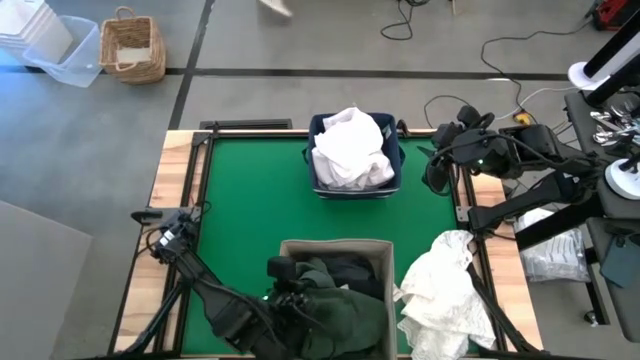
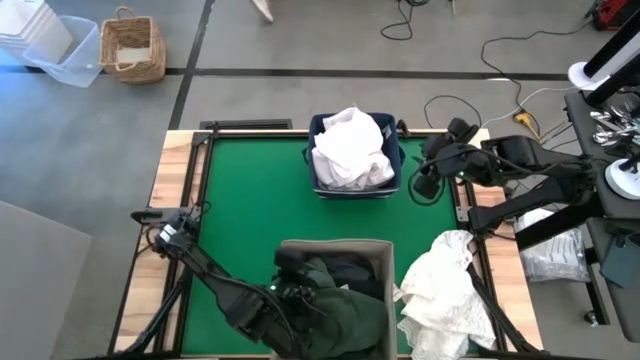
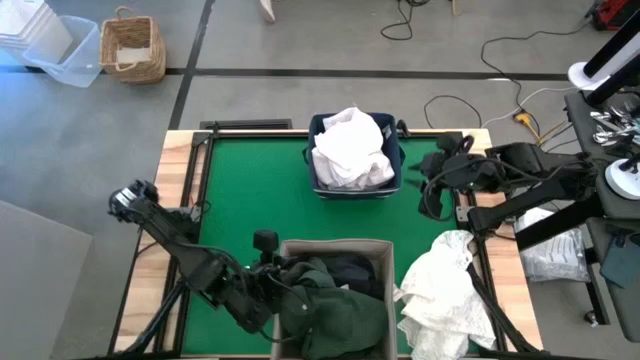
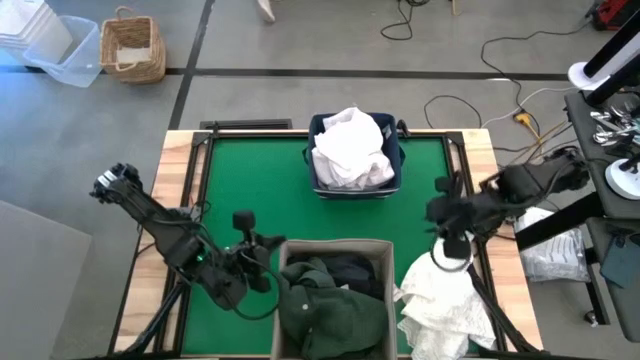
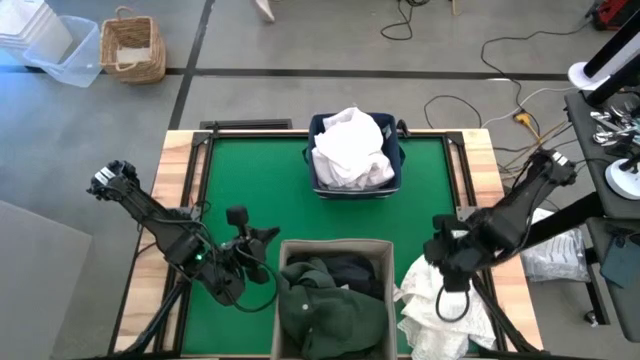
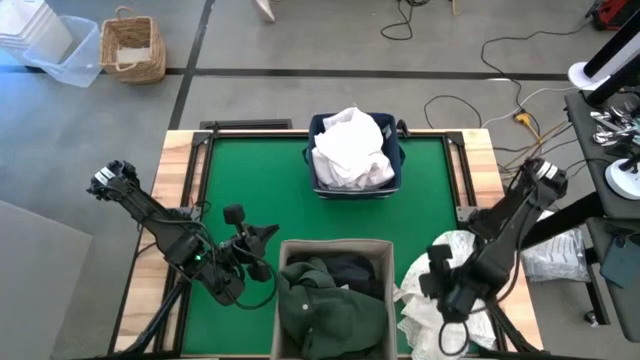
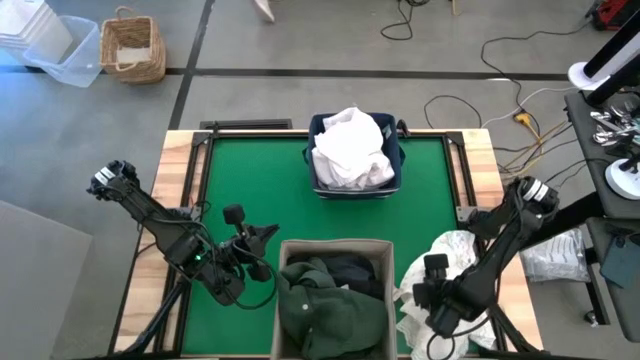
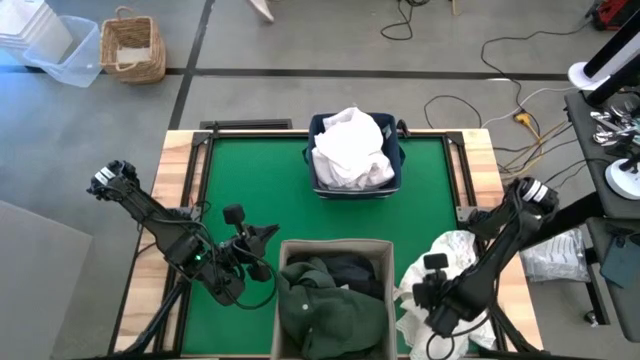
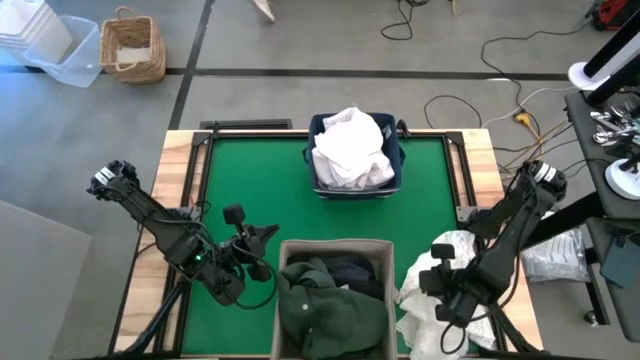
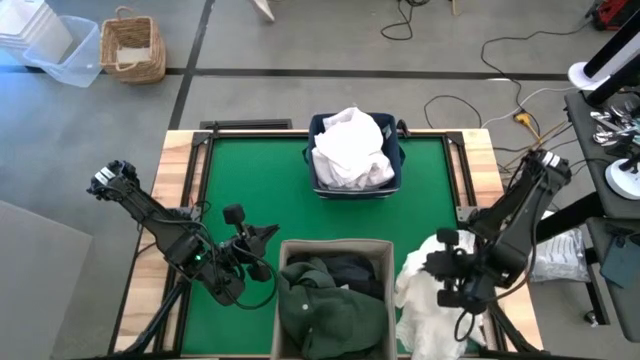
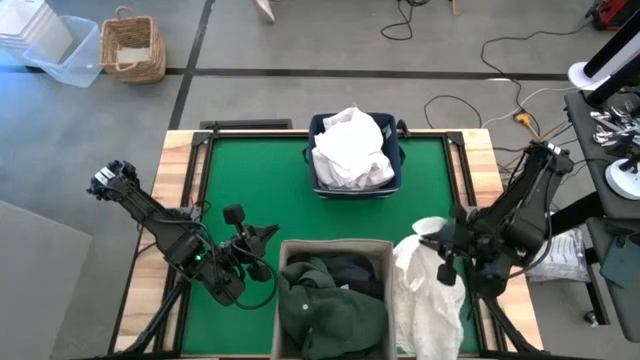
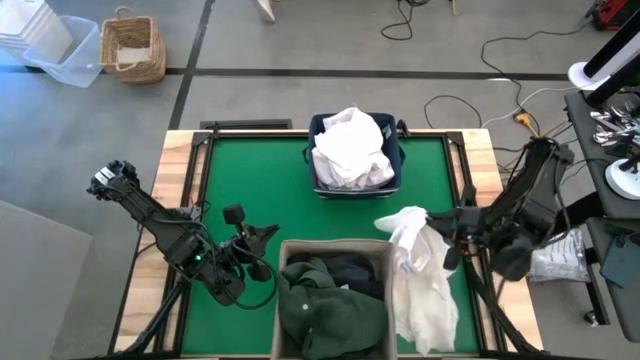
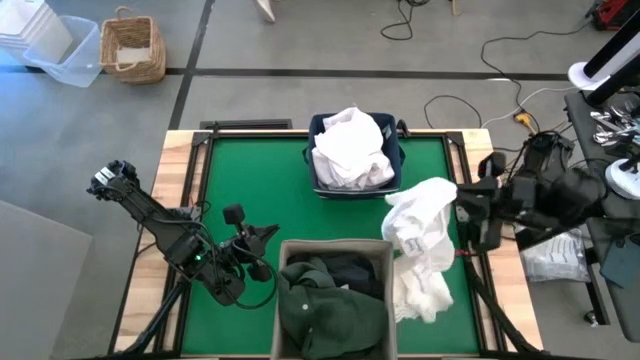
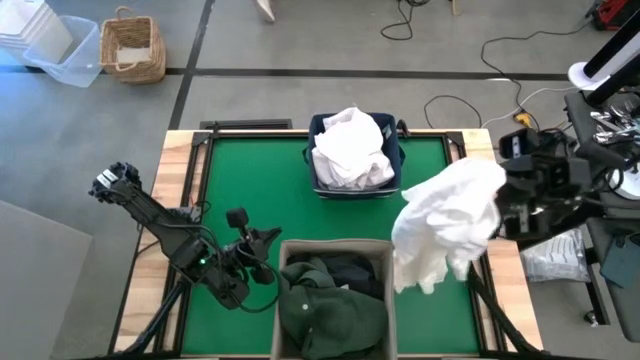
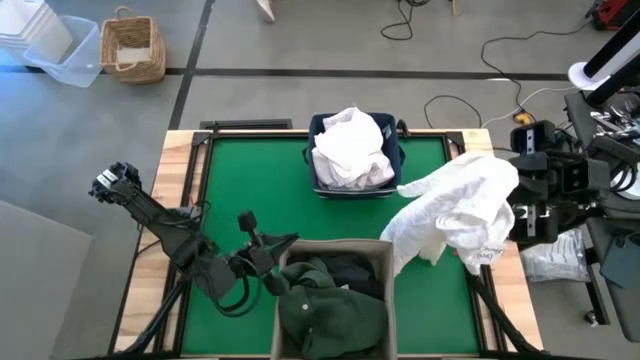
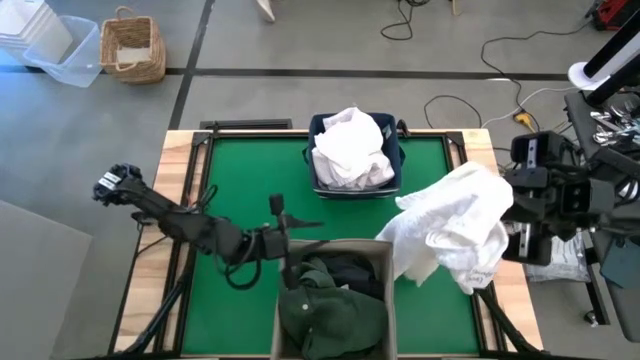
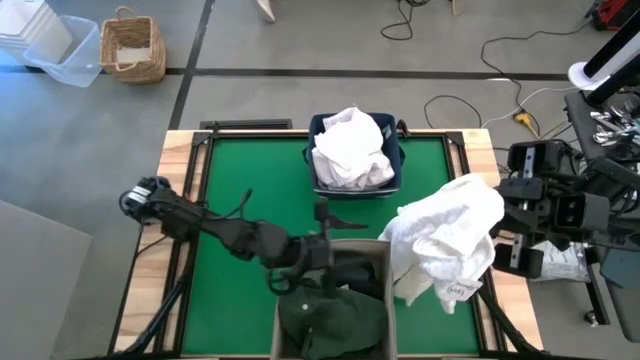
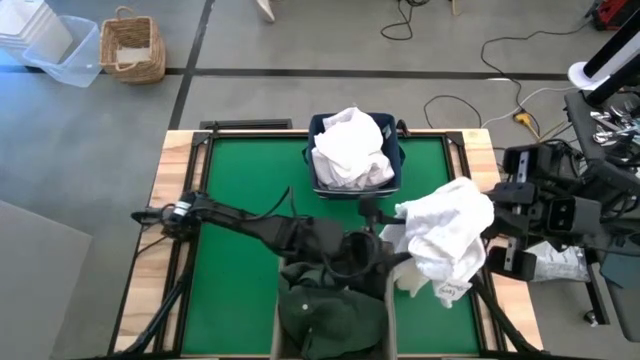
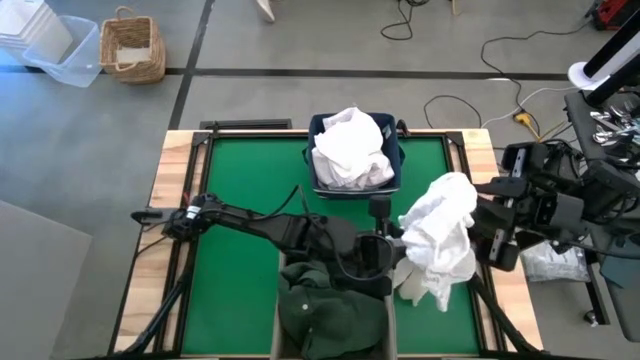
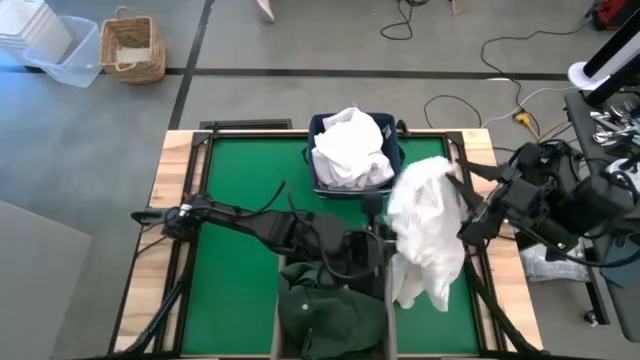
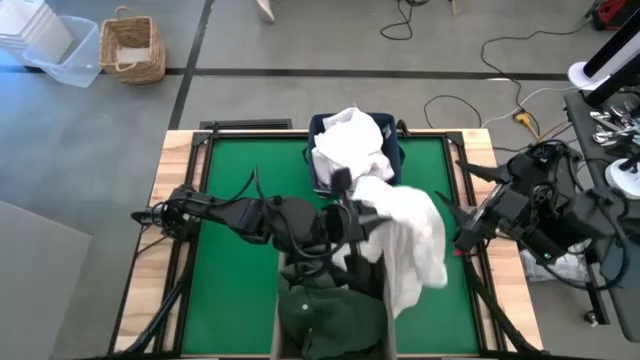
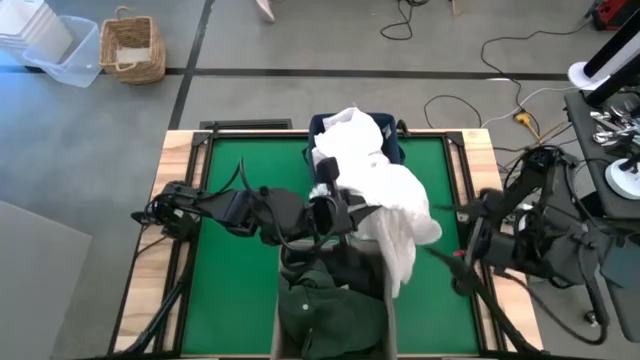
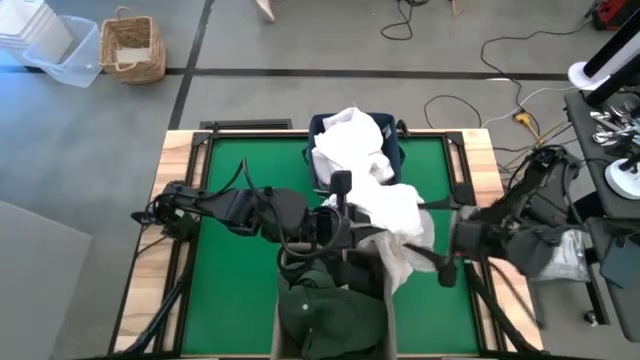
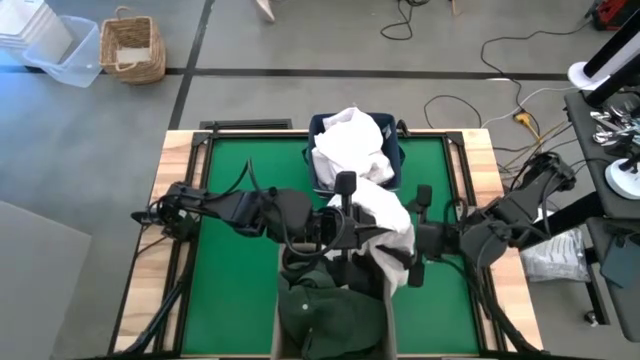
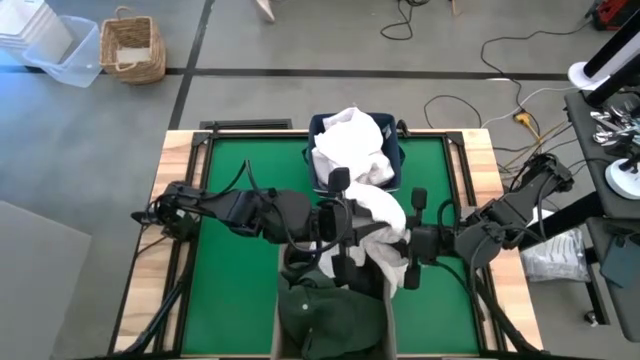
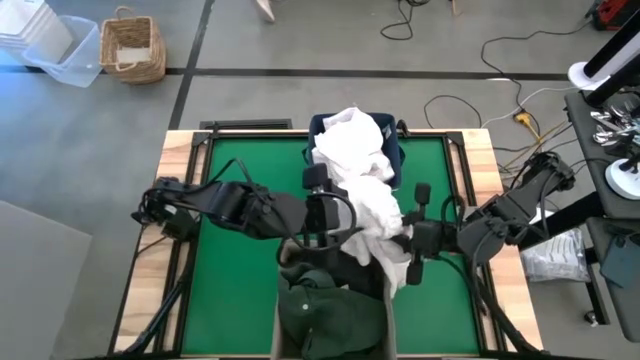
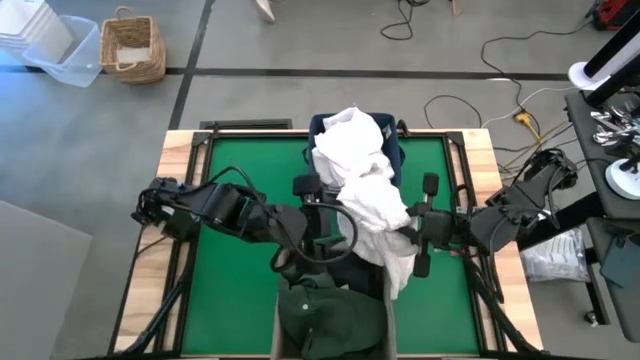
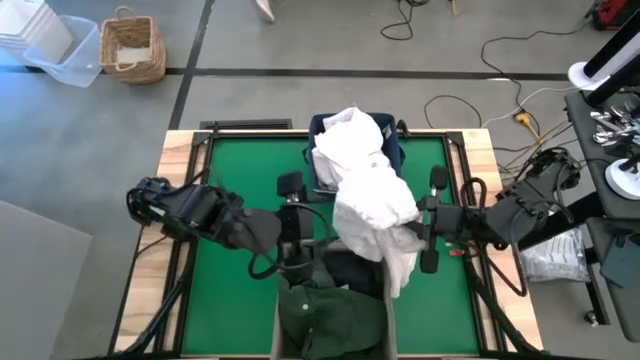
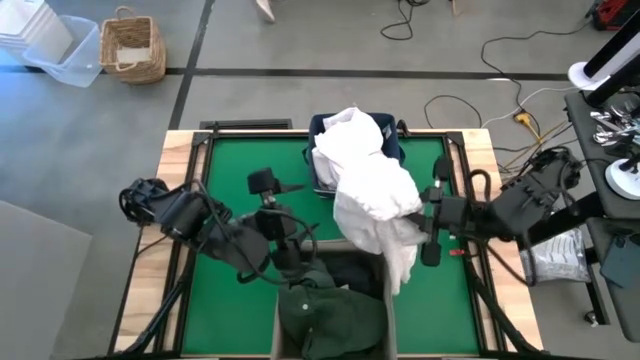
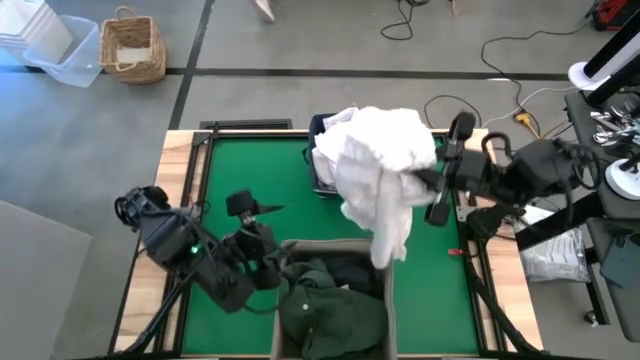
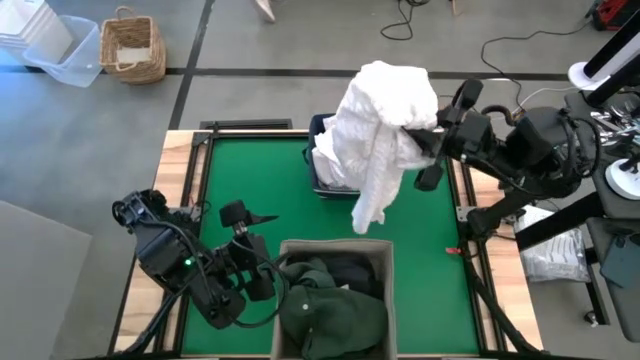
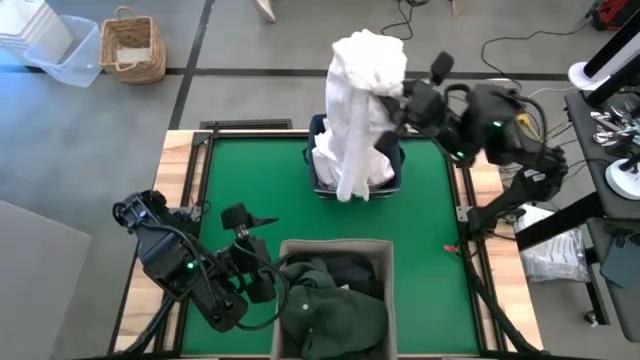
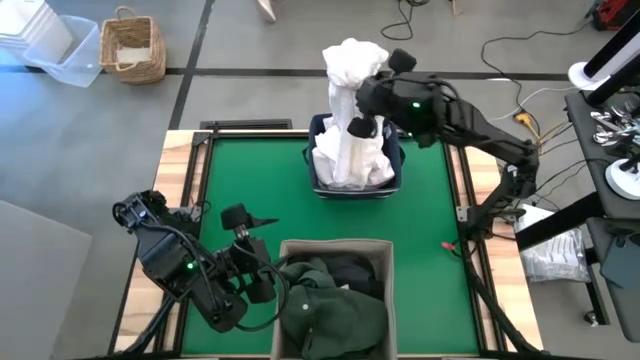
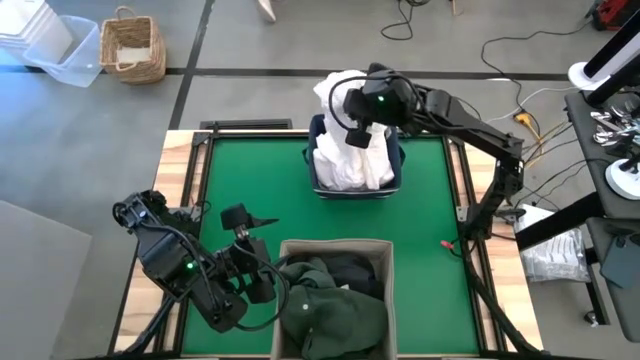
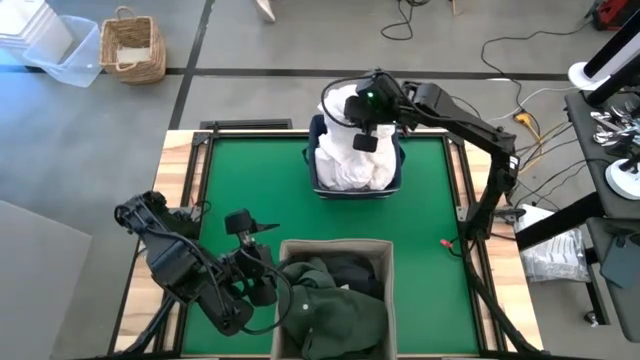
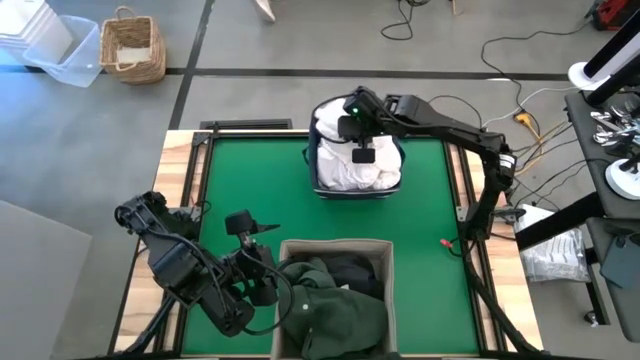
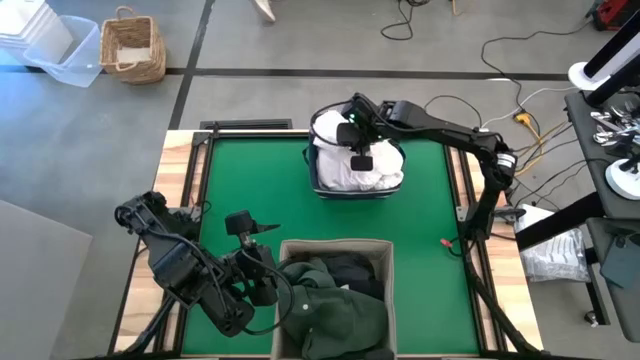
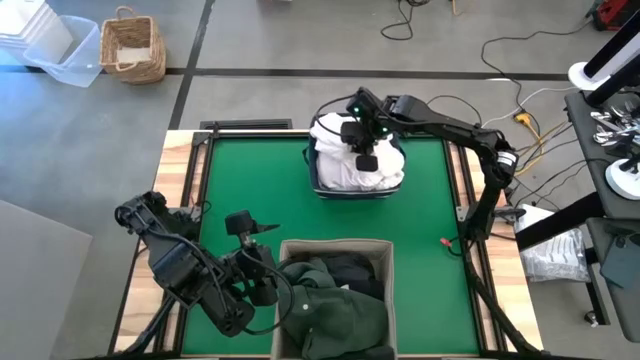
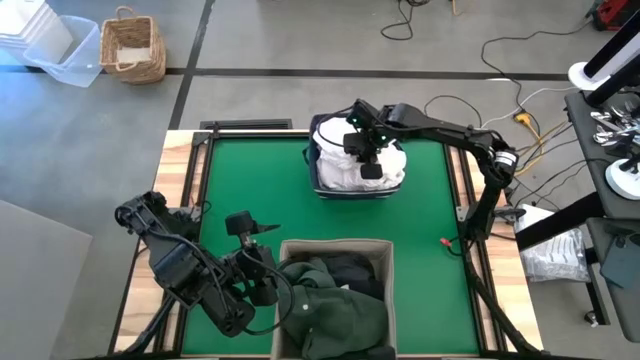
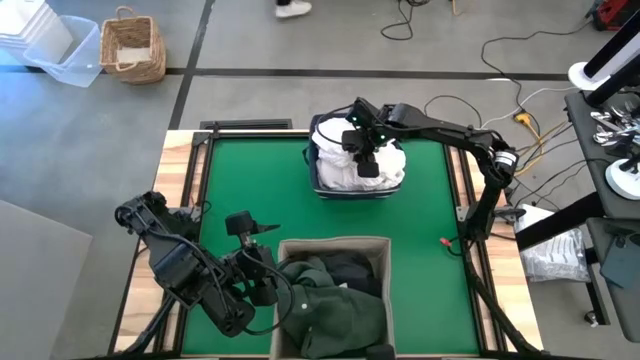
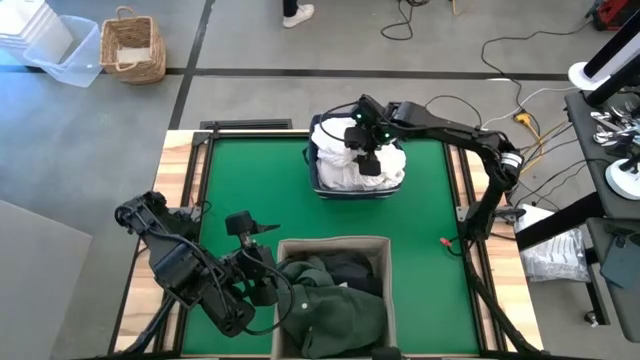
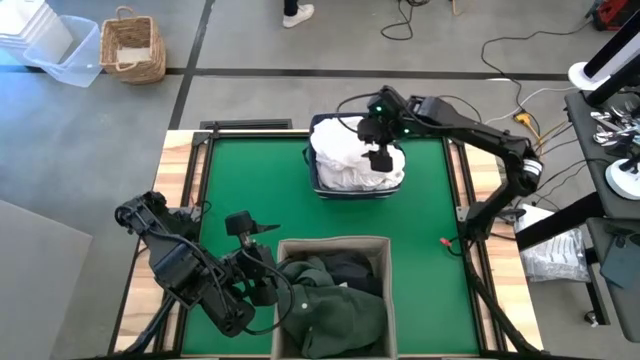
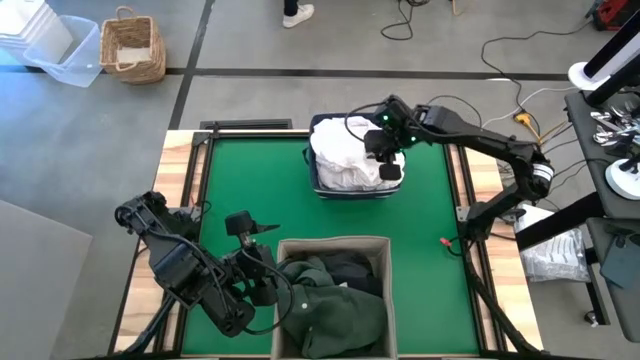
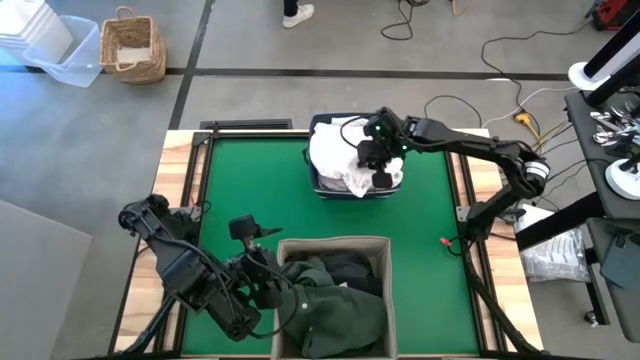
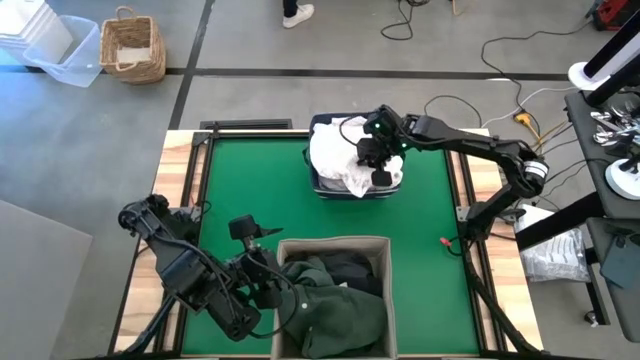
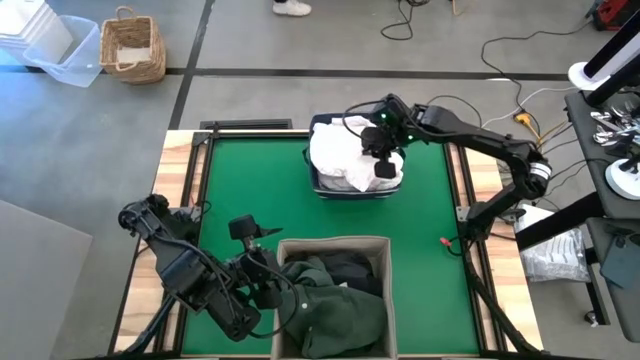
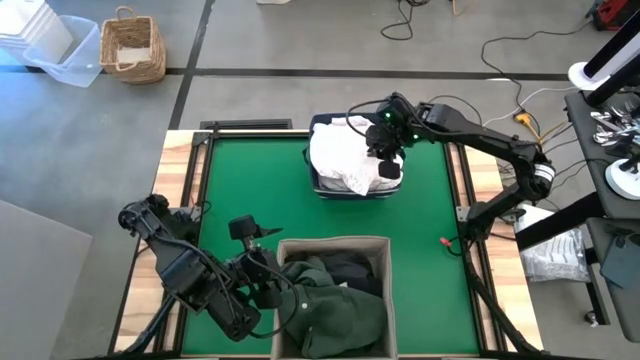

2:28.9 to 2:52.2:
Put the white shirt into the blue laundry bin
